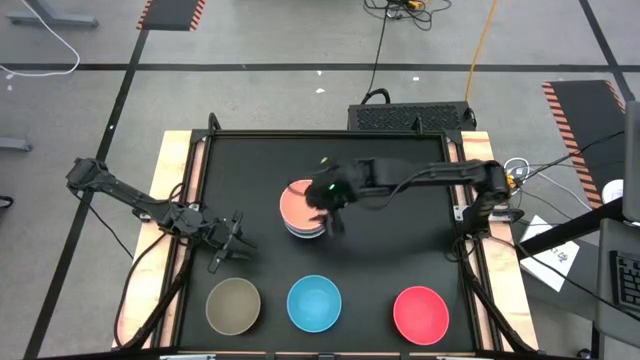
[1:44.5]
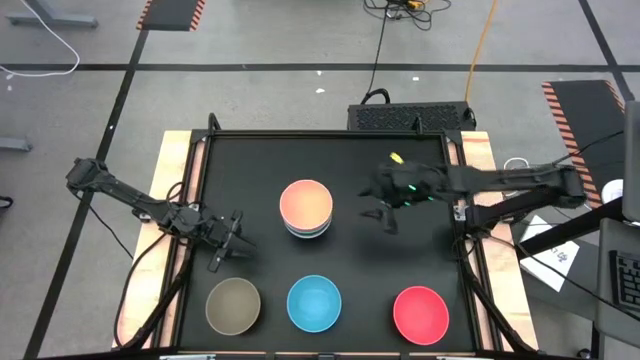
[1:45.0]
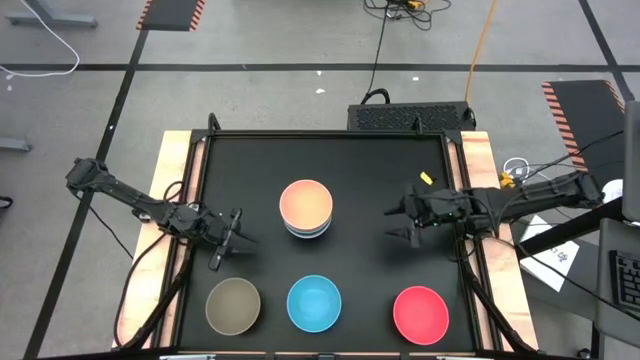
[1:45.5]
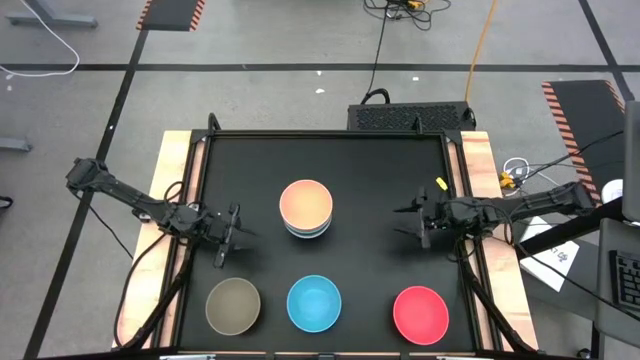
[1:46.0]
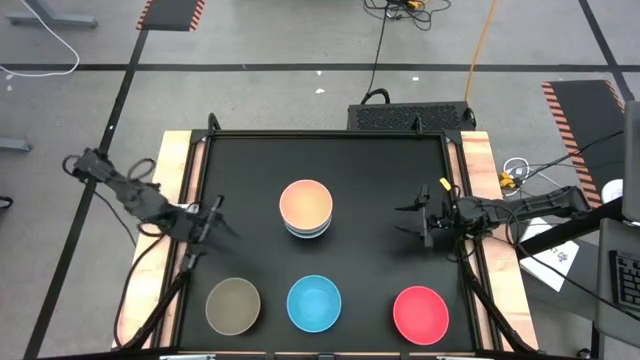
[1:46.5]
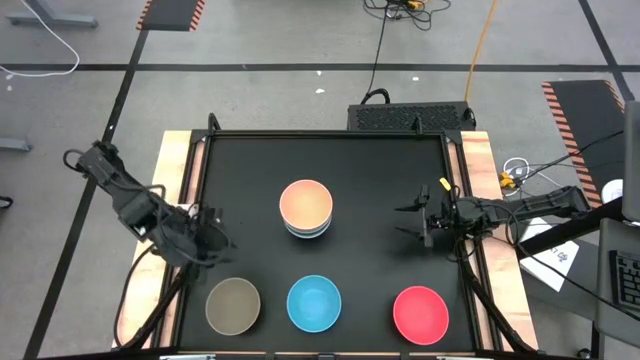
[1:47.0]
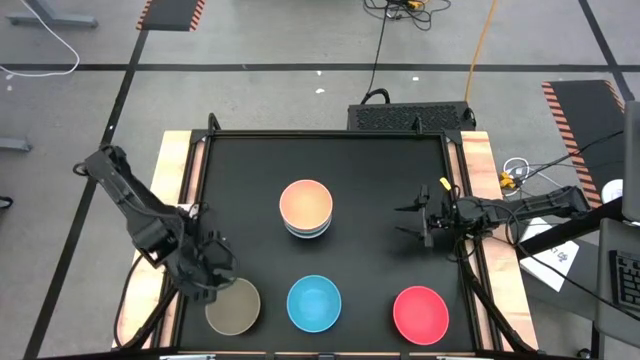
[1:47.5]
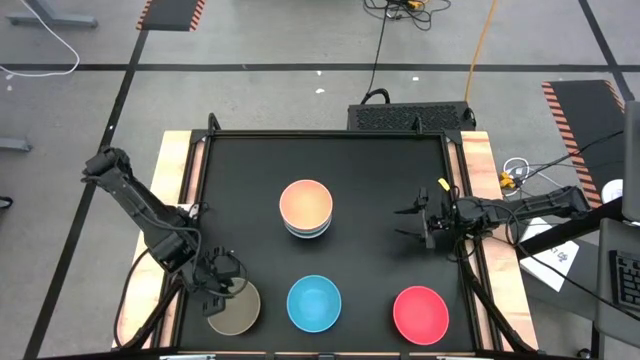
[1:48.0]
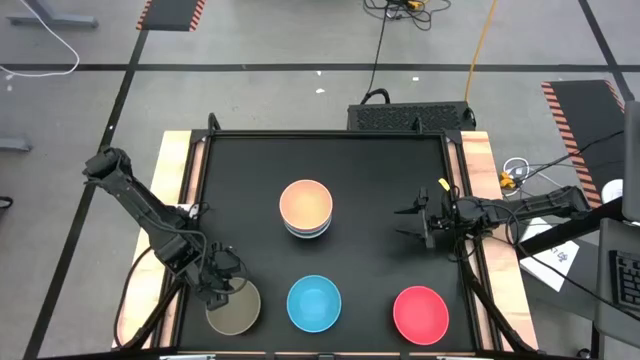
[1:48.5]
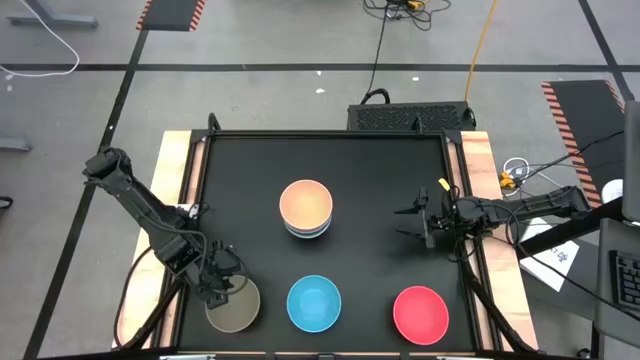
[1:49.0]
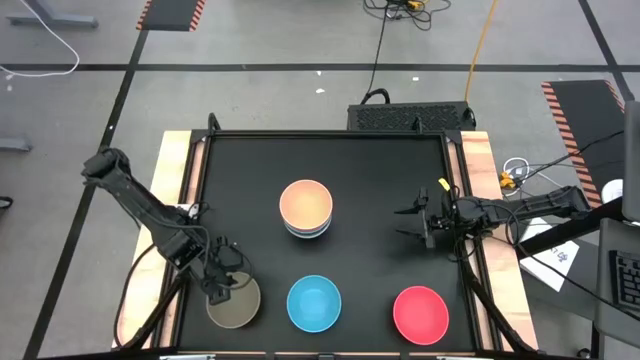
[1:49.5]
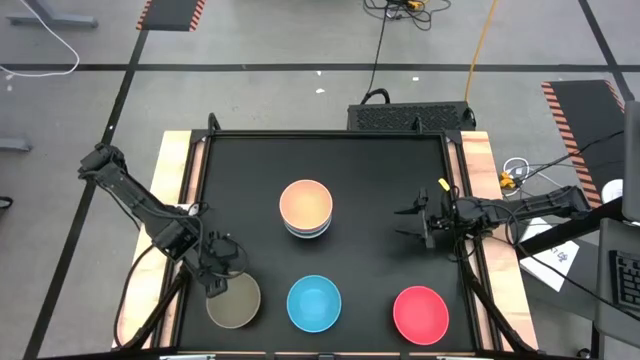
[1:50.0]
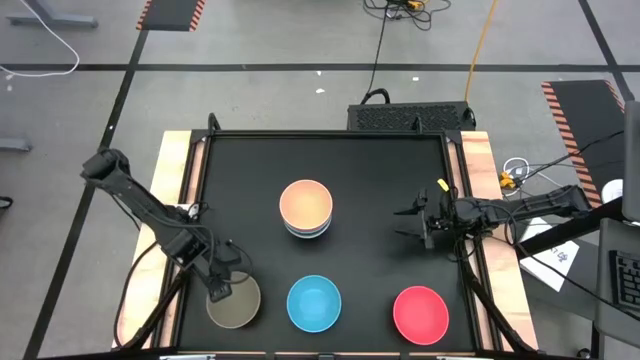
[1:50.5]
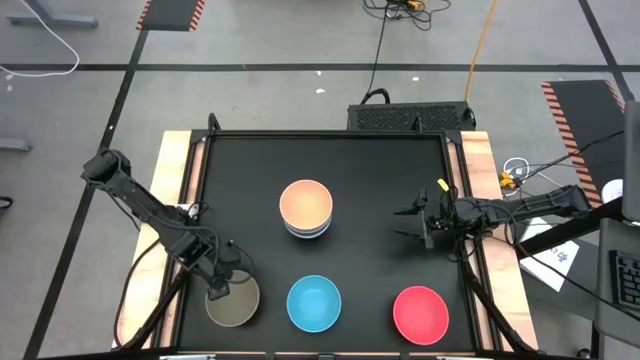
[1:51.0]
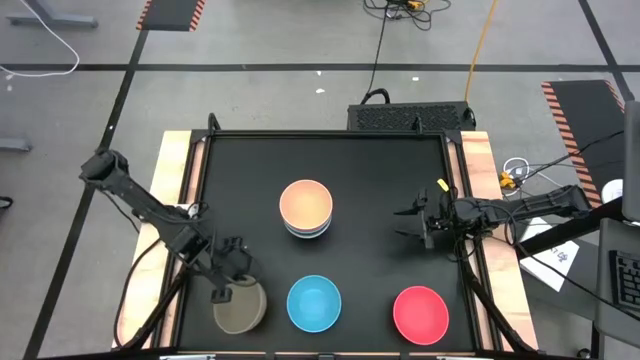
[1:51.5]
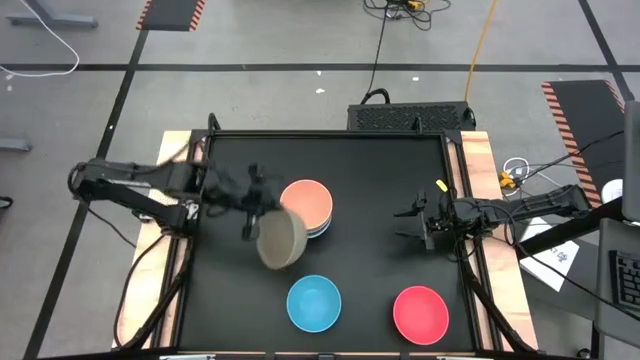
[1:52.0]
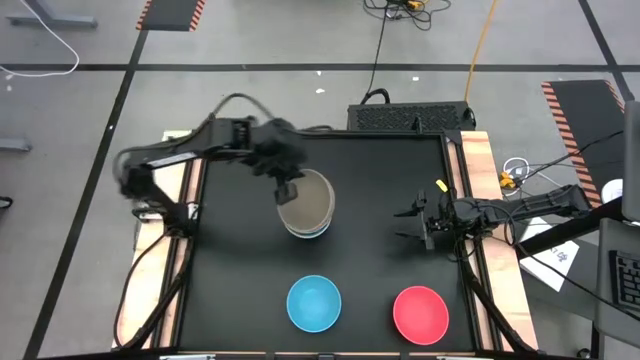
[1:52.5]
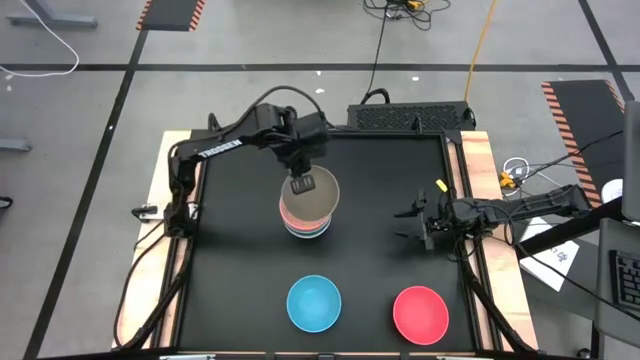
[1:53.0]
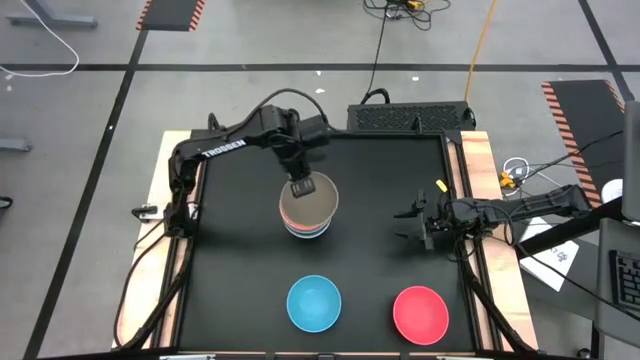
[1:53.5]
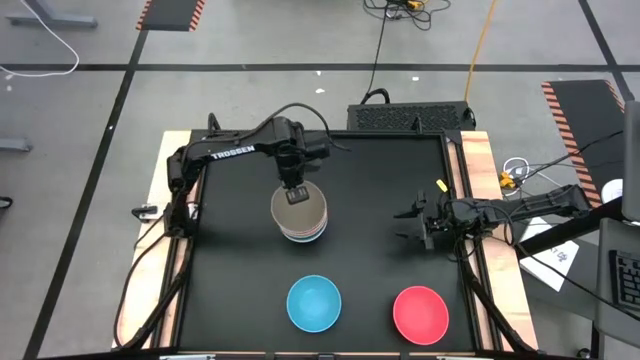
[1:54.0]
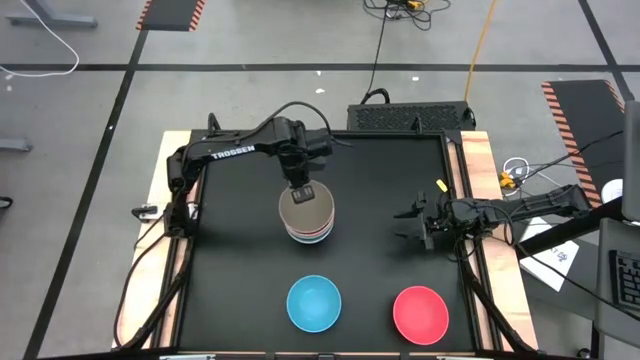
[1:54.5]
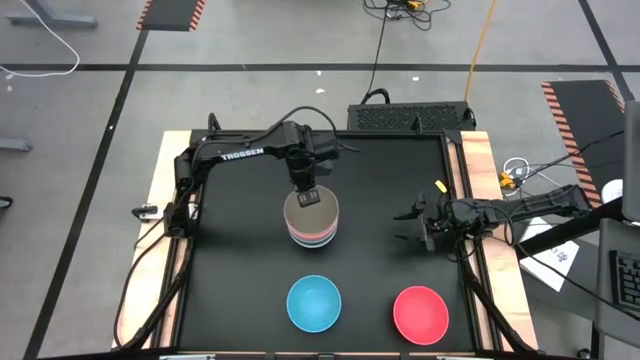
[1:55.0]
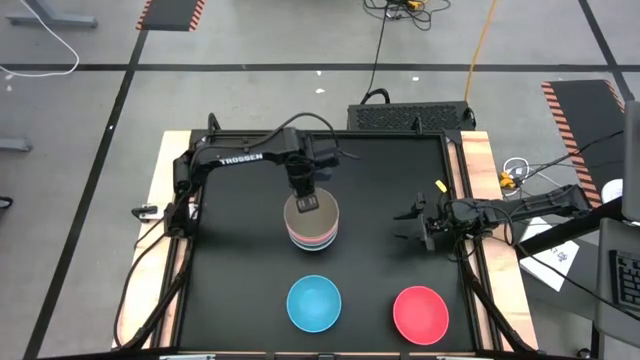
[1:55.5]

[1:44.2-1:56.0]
Task: Nest bowls inside each other
Stack the gray bowl on the orange bowl

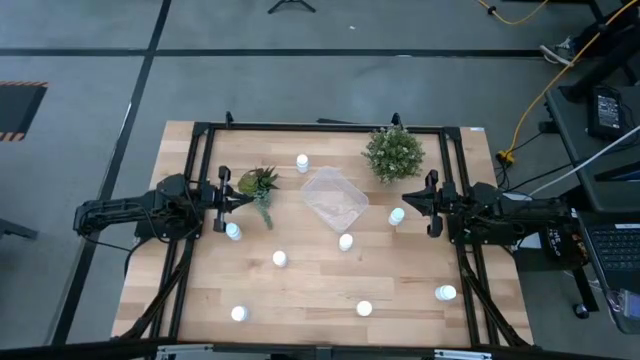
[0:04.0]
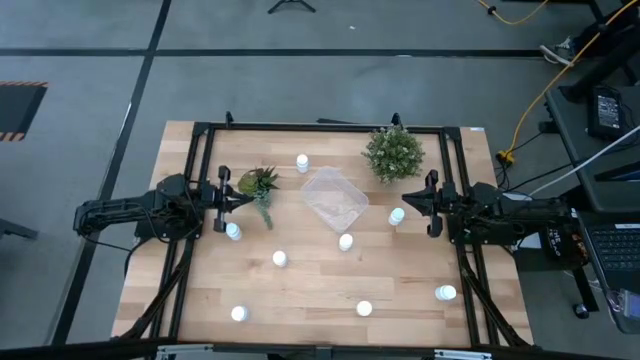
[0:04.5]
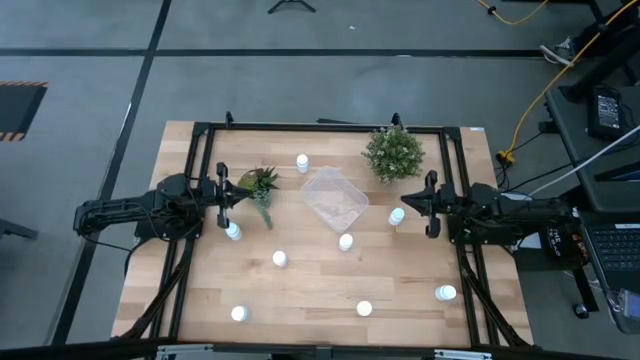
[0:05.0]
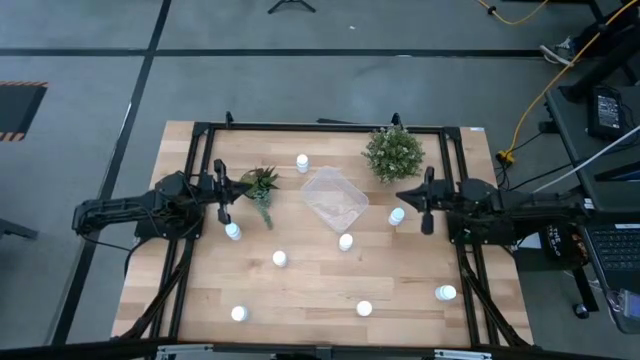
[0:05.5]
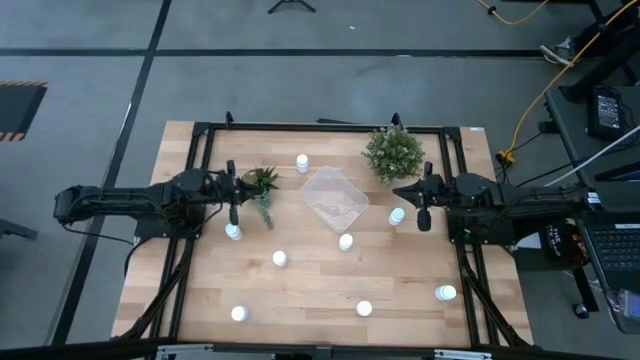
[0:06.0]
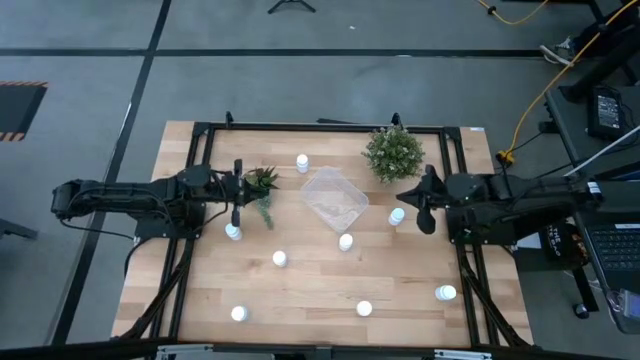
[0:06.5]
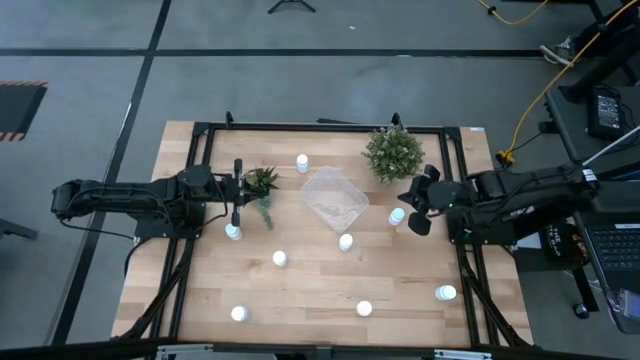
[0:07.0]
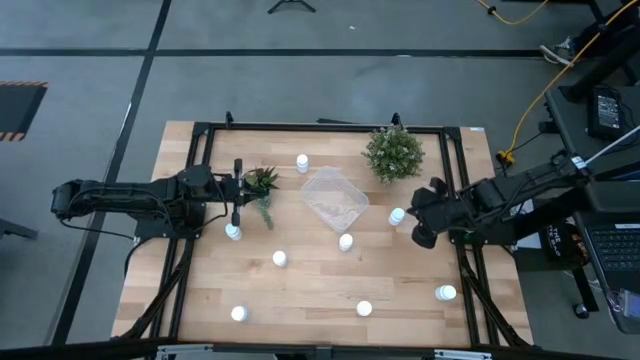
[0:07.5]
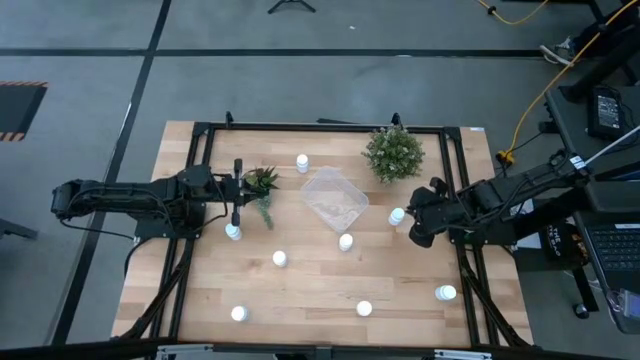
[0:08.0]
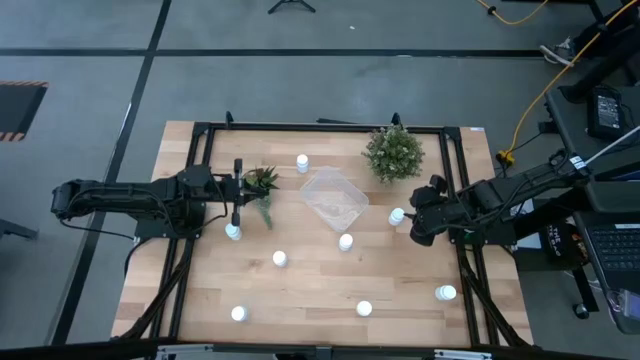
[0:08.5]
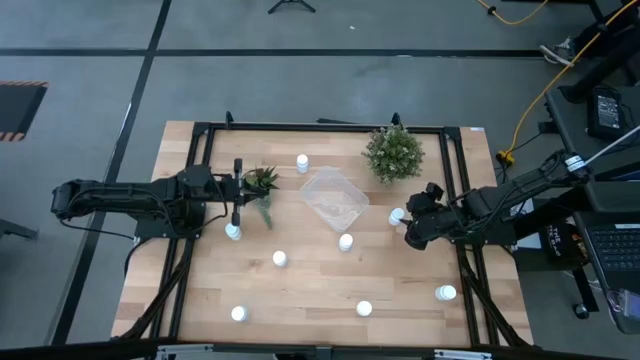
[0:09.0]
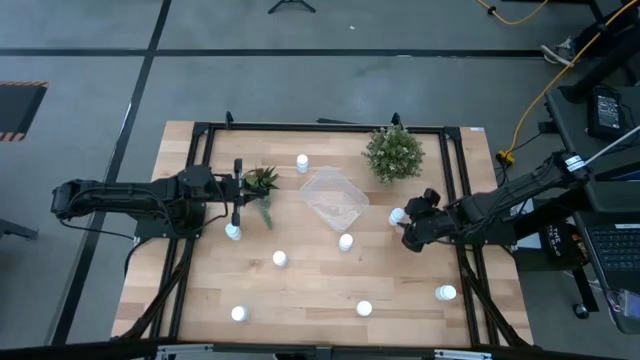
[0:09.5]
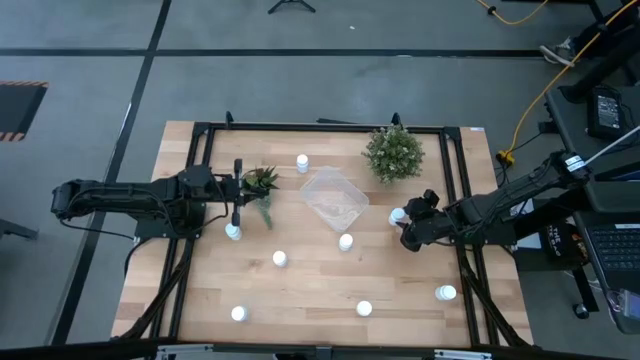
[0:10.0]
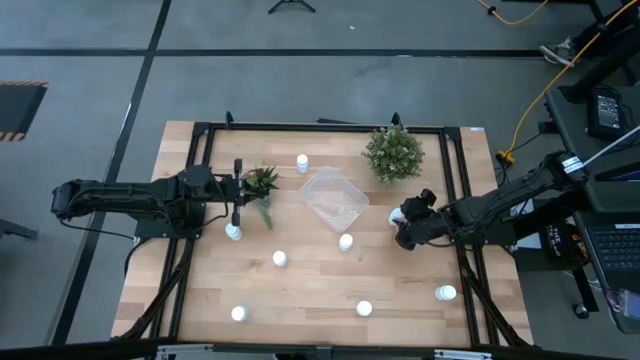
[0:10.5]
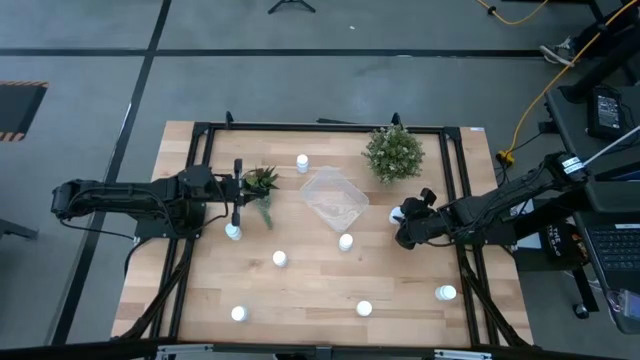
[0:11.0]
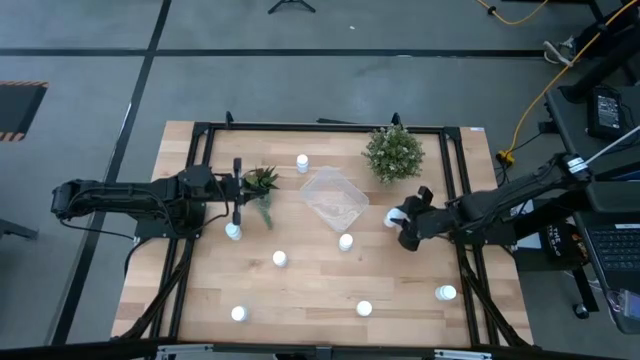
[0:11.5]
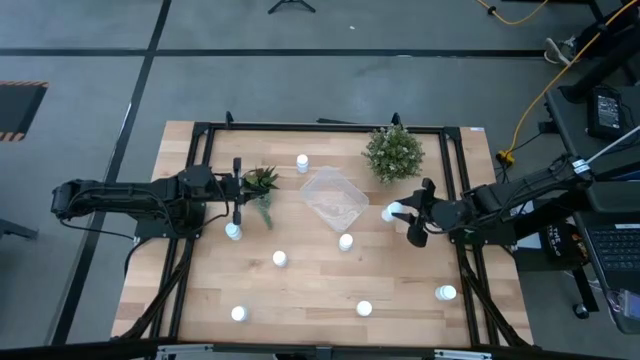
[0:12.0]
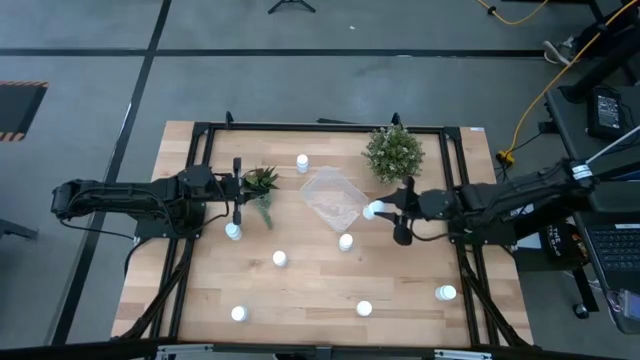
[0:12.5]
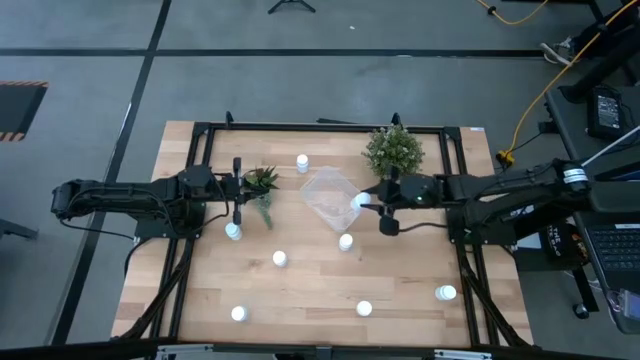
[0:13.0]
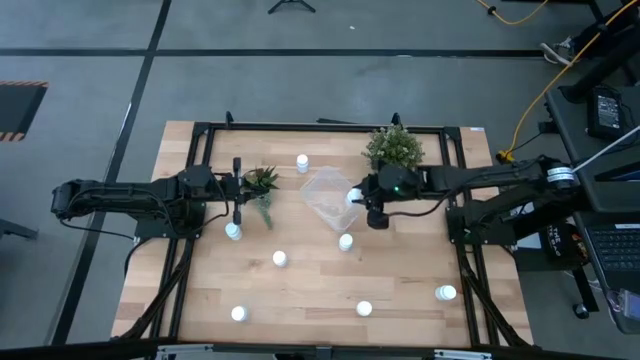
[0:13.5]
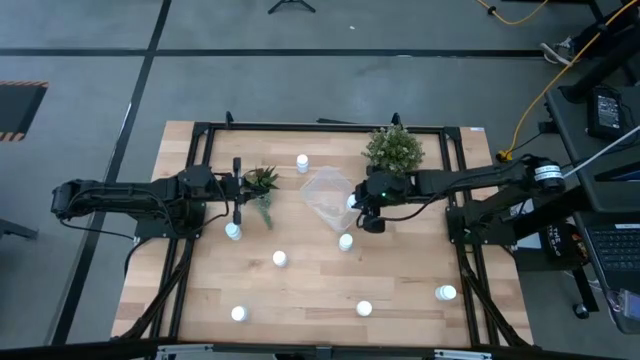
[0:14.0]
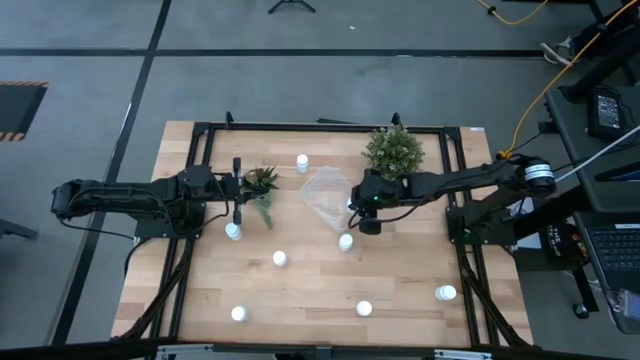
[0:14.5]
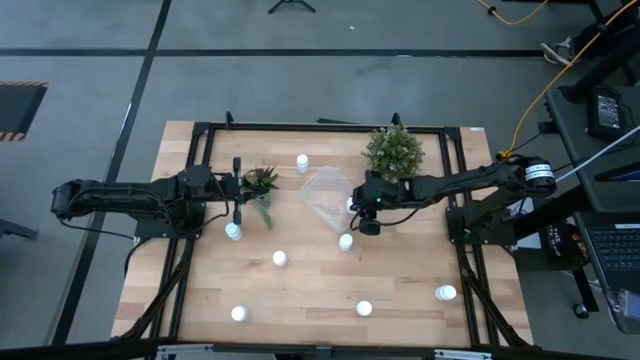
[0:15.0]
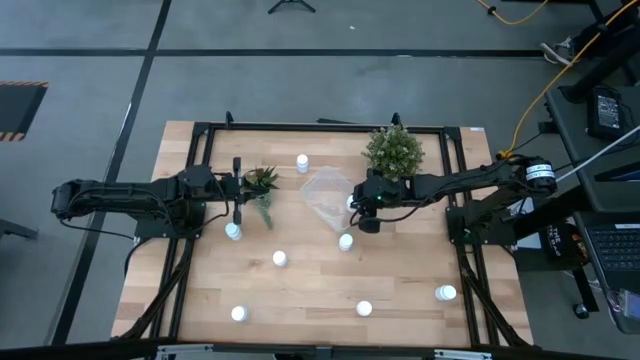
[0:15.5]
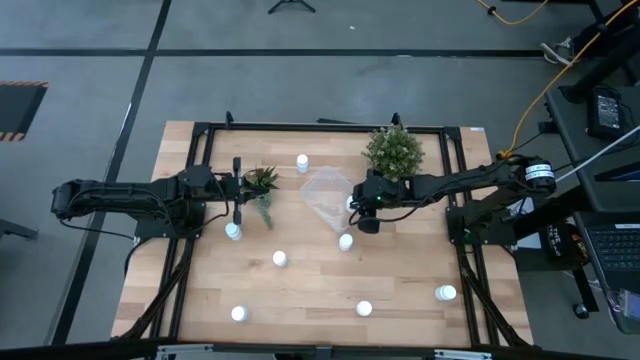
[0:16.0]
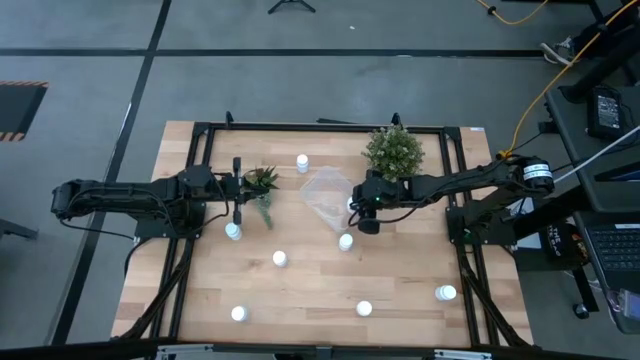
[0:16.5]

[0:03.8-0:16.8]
Task: Pick and place pill bottles into a basket
Put the pill bottle into the transparent bin
